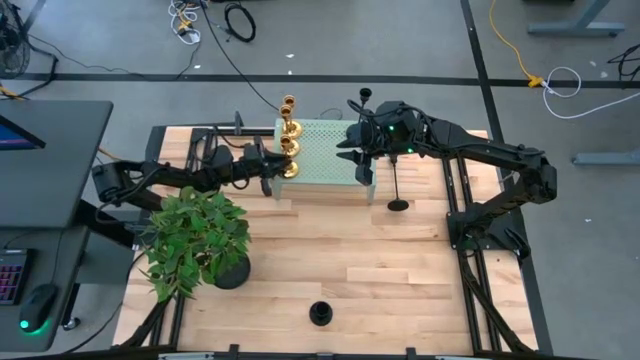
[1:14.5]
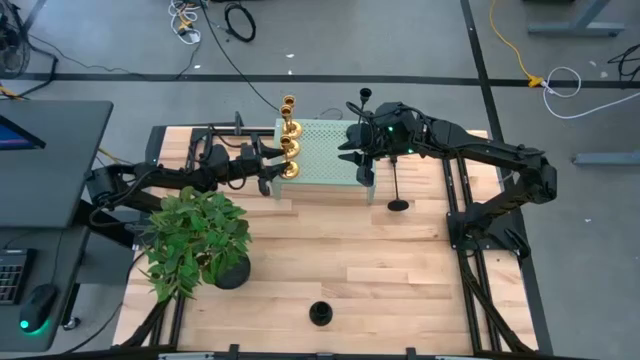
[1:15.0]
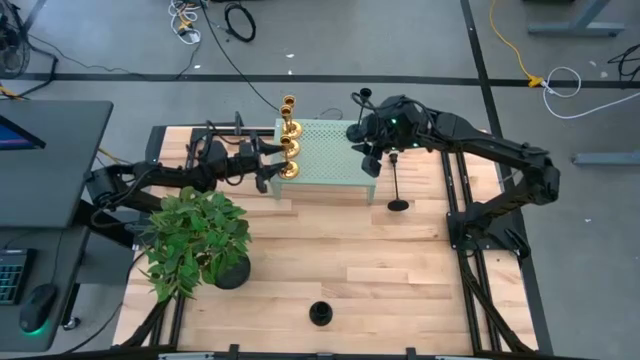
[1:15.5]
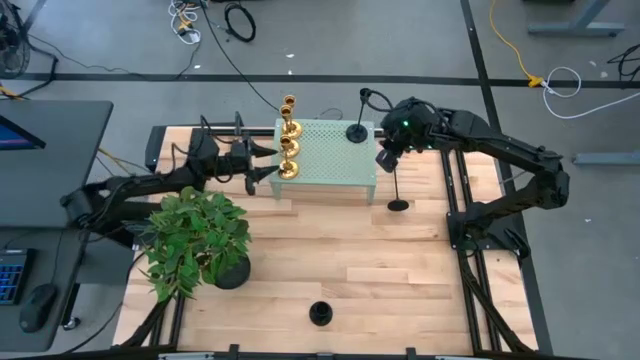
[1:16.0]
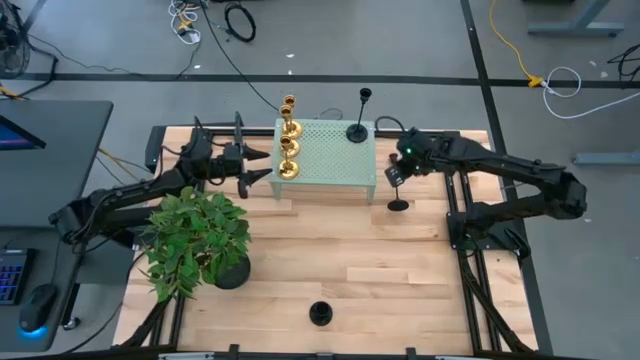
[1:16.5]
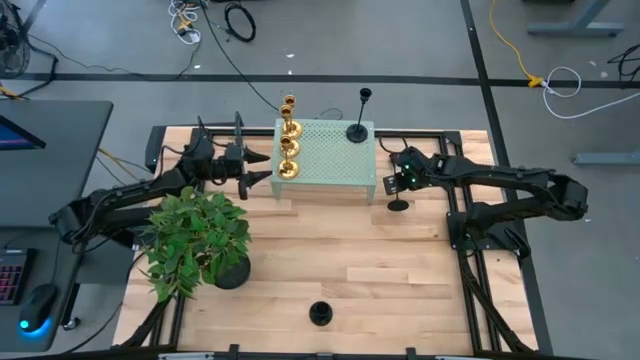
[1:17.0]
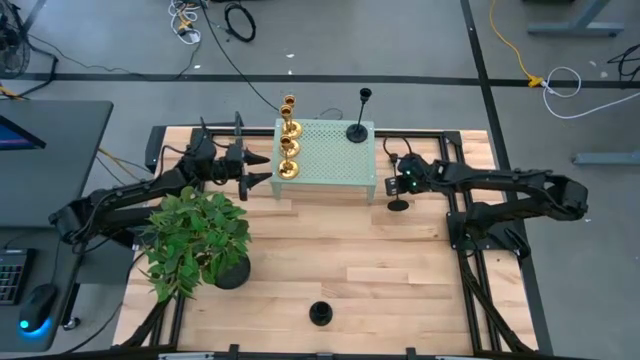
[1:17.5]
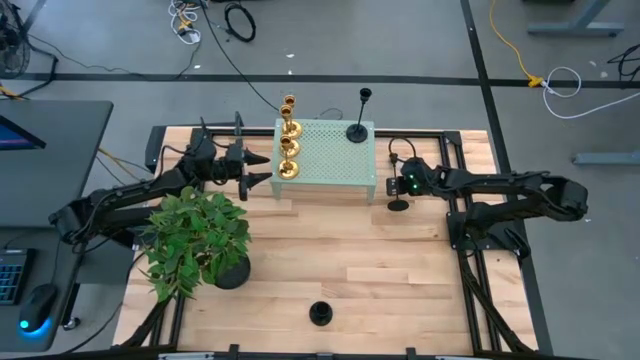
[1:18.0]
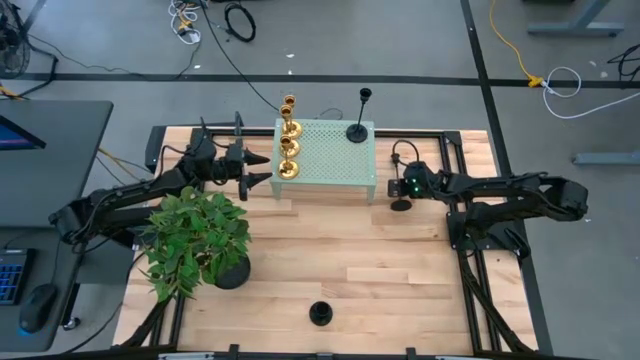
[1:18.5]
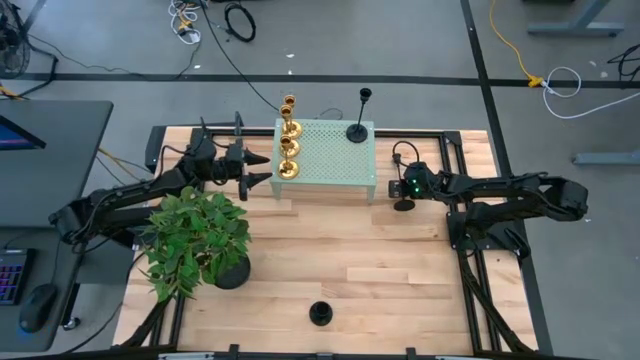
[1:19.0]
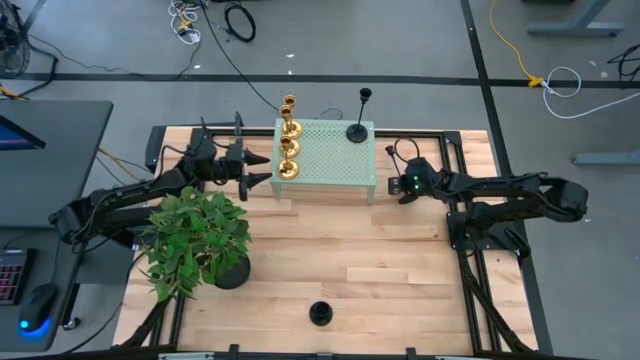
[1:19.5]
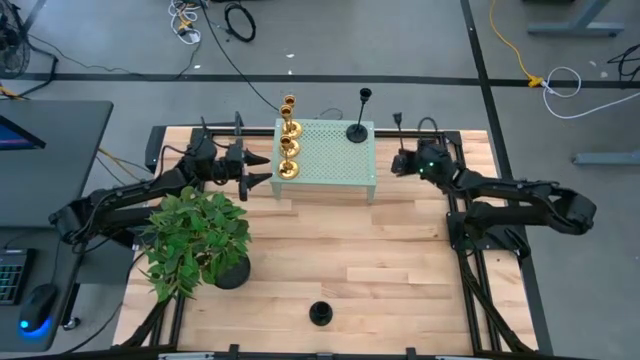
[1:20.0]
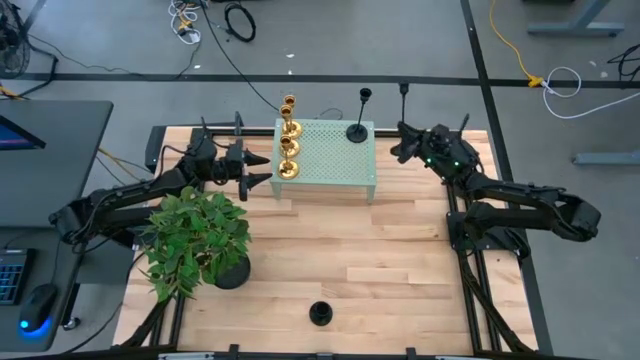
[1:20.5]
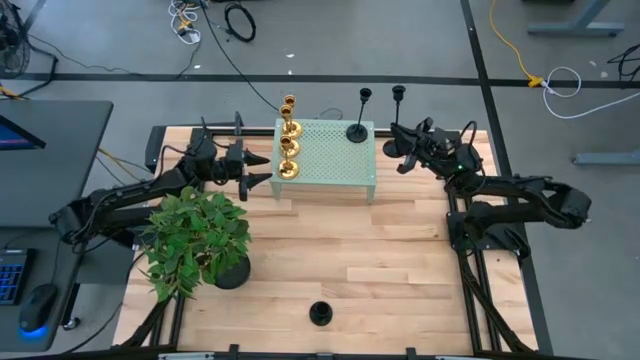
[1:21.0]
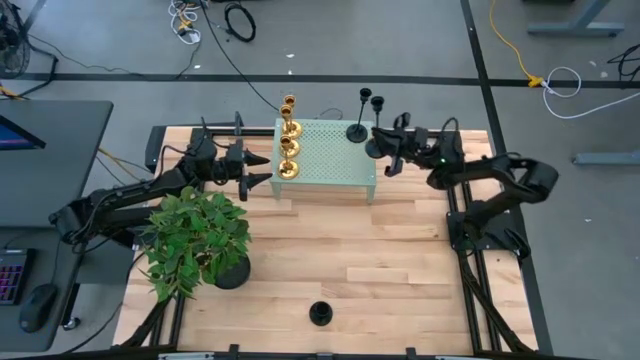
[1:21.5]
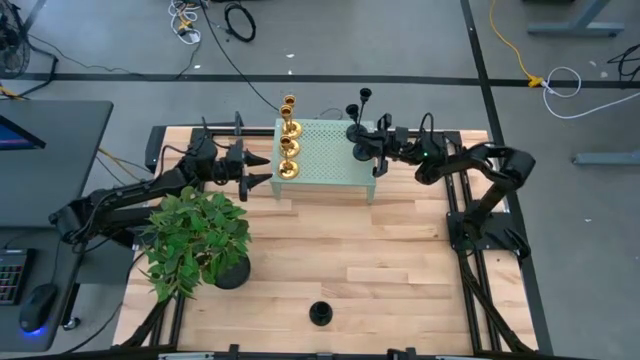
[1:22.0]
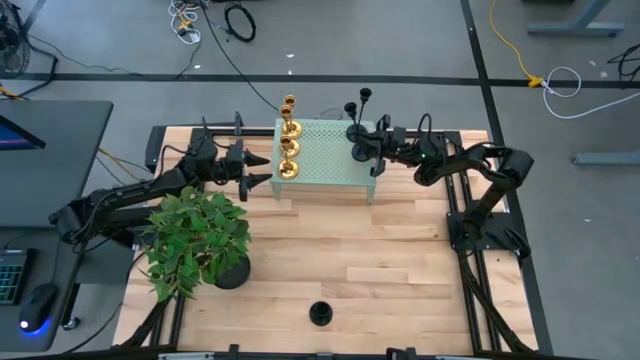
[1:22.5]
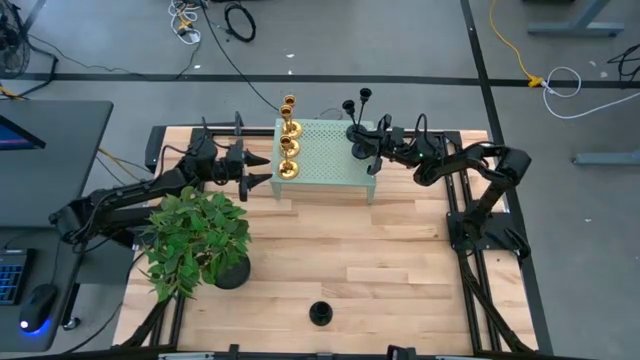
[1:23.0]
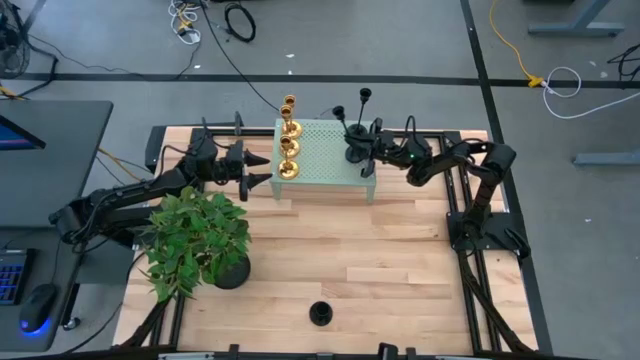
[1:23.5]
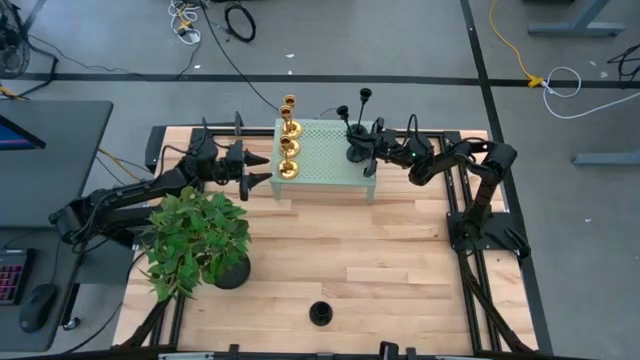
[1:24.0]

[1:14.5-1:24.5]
Task: Pick & Place candle stick holders
Put the top black candle holder on the shelf

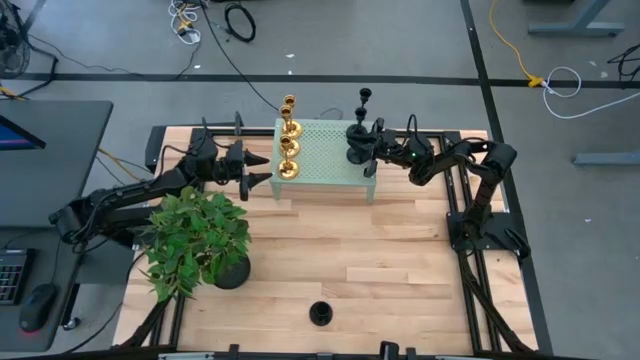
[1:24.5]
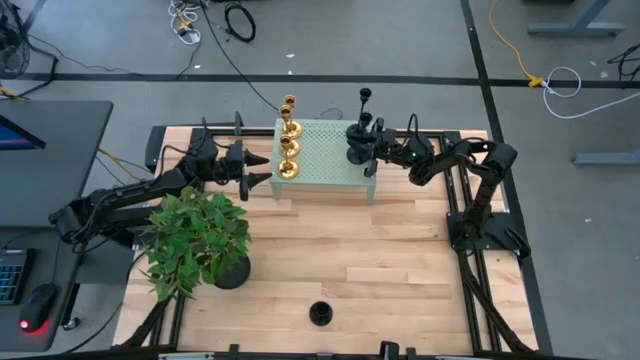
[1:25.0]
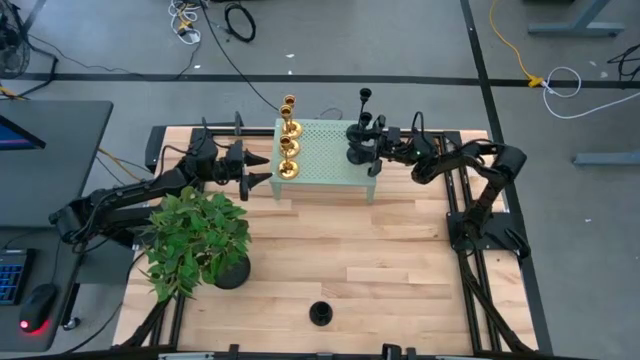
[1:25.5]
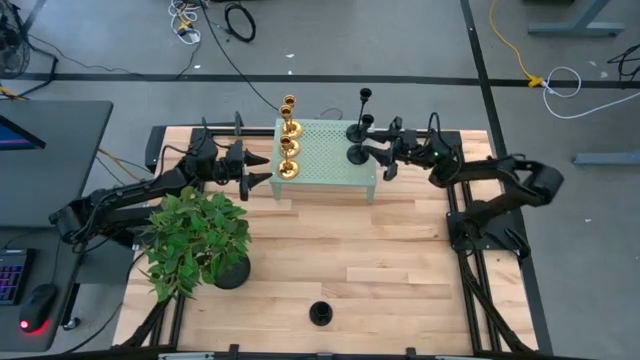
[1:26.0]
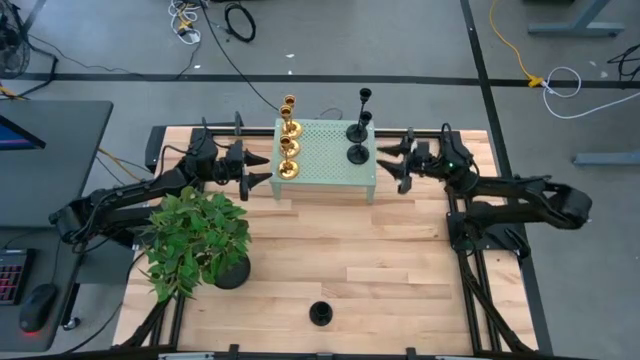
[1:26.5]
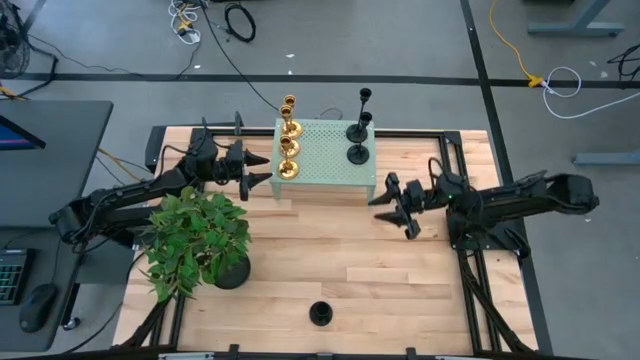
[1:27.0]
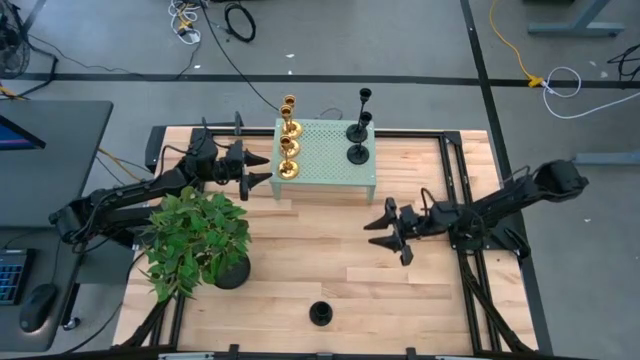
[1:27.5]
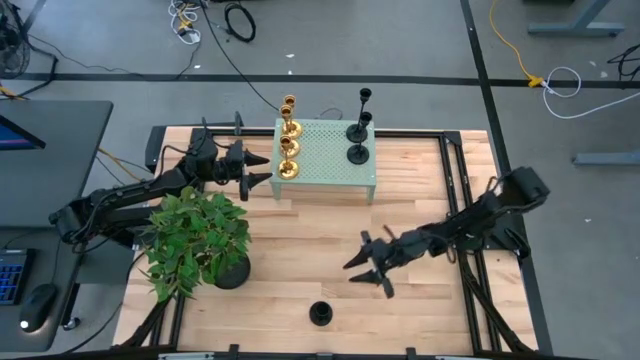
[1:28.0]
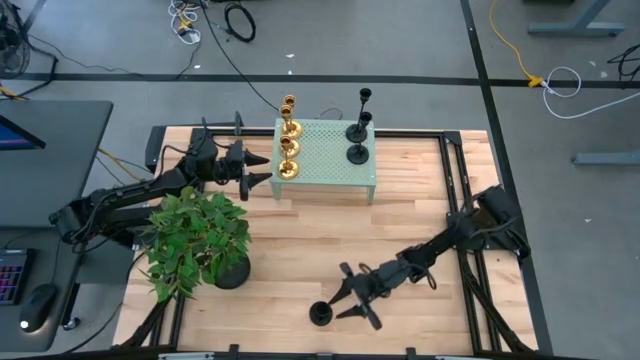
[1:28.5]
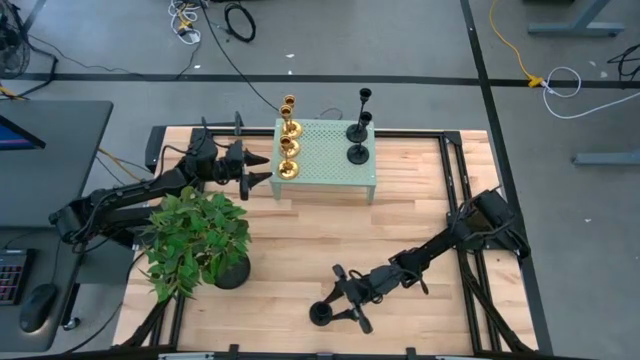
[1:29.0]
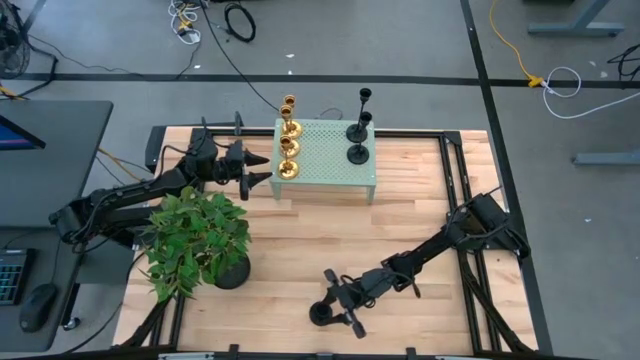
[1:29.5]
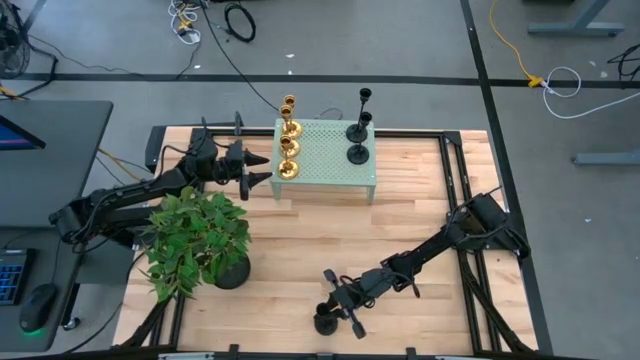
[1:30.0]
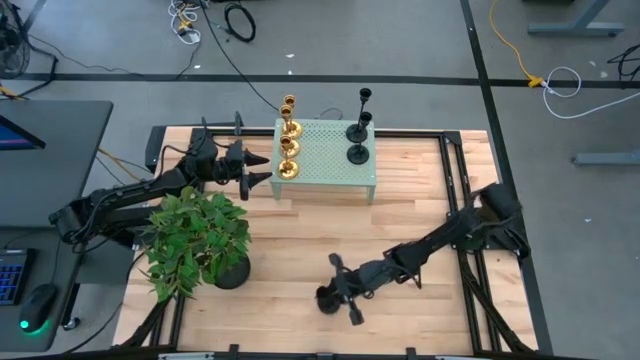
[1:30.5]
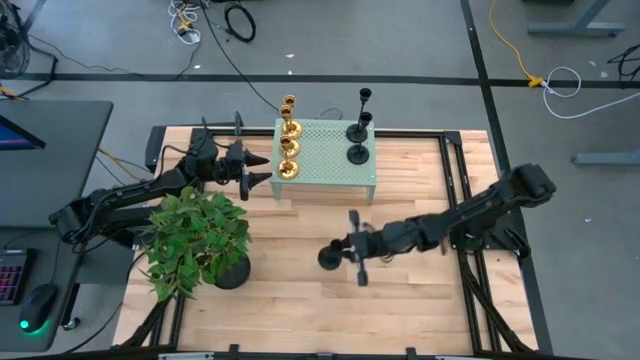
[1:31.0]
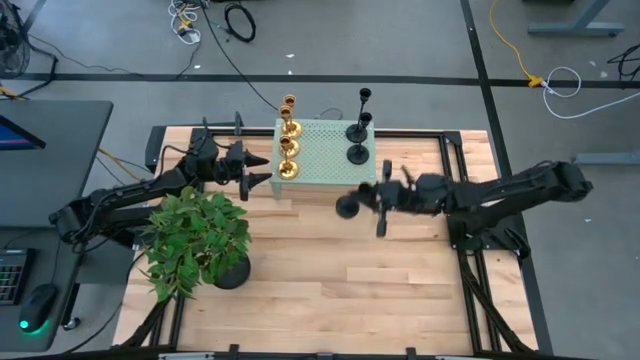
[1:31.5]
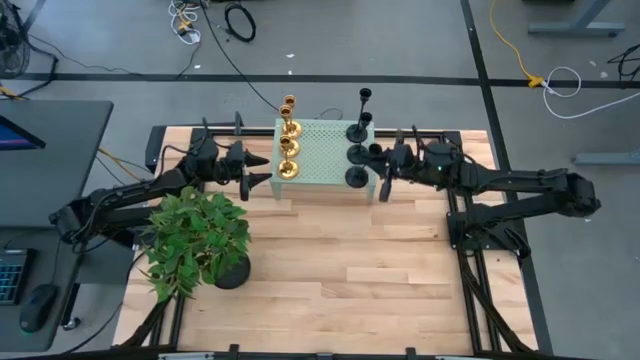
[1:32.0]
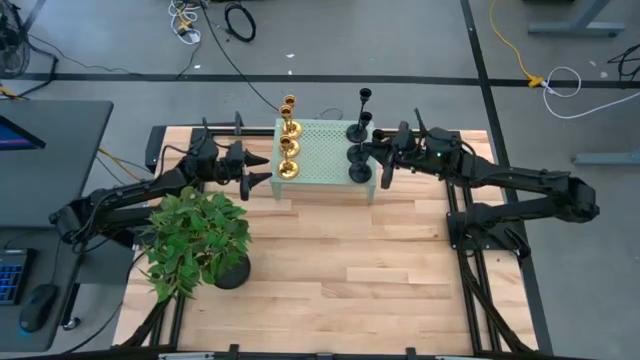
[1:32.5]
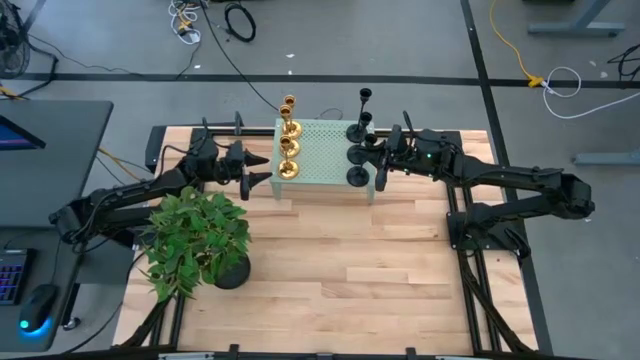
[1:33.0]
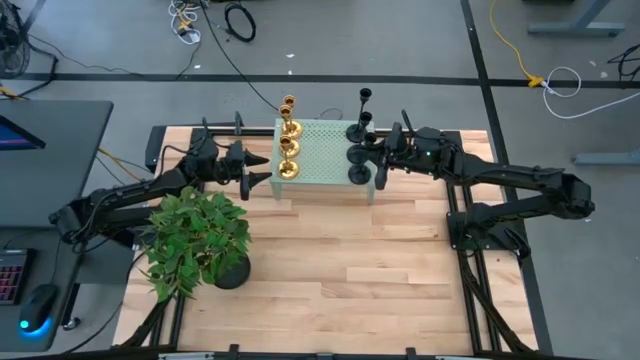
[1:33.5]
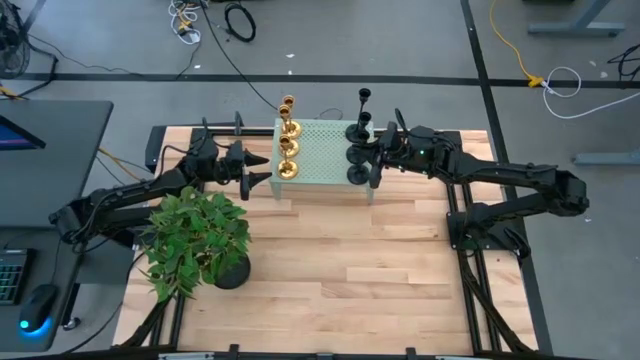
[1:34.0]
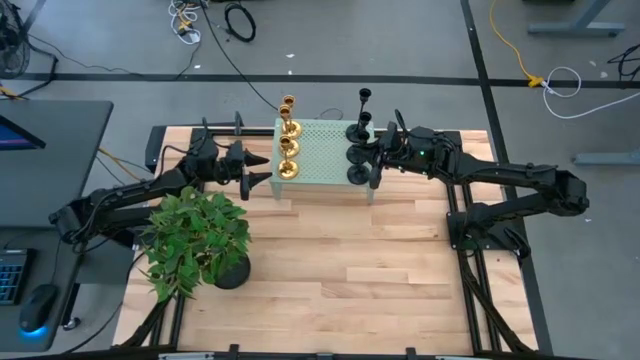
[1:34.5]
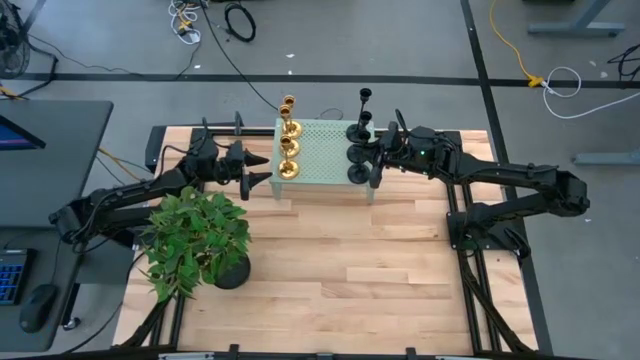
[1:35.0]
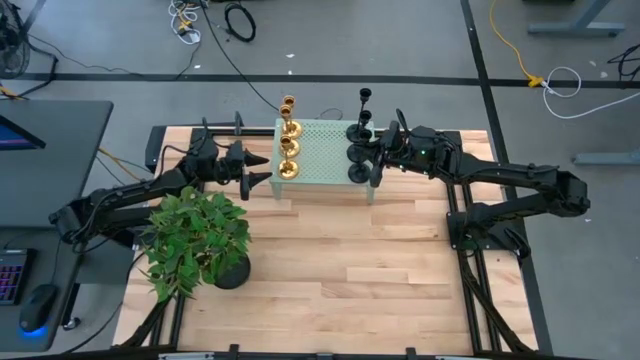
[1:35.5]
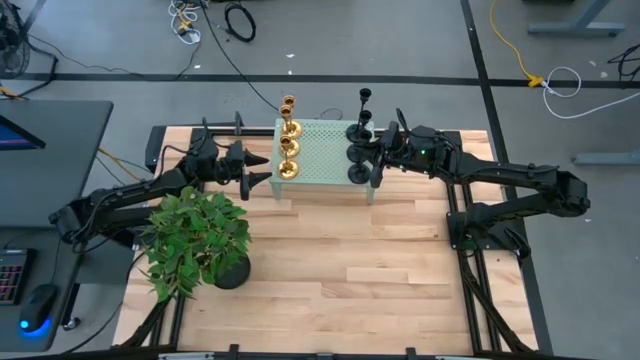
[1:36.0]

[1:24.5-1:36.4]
Put the black candle holder on the shelf
